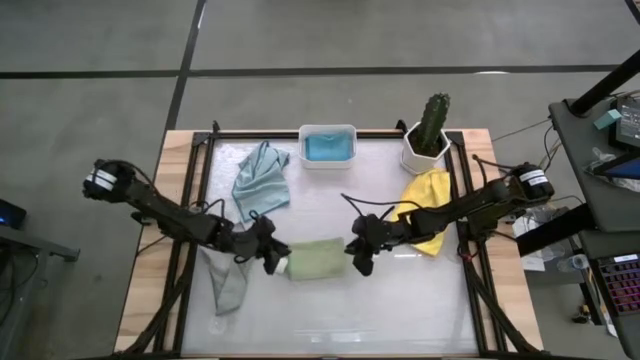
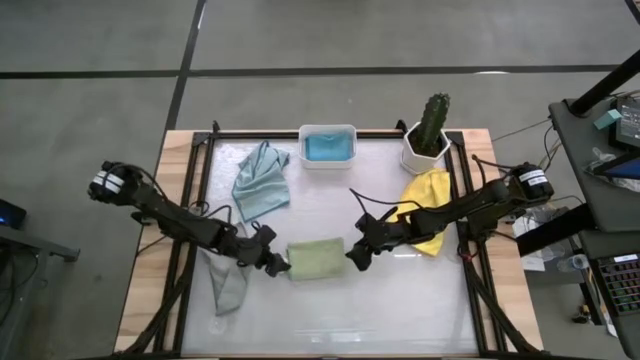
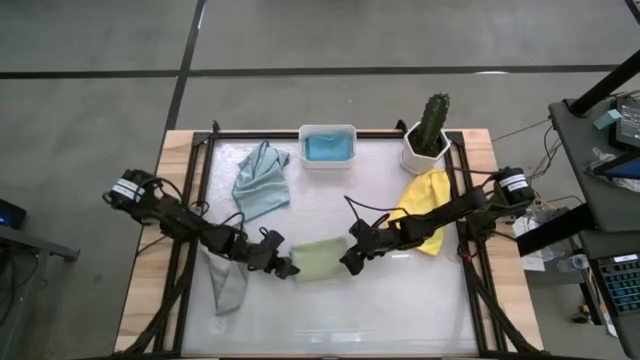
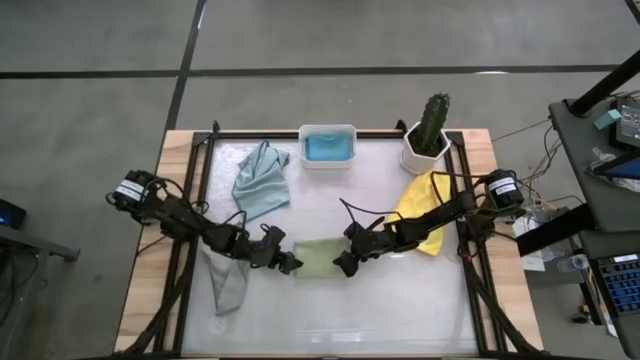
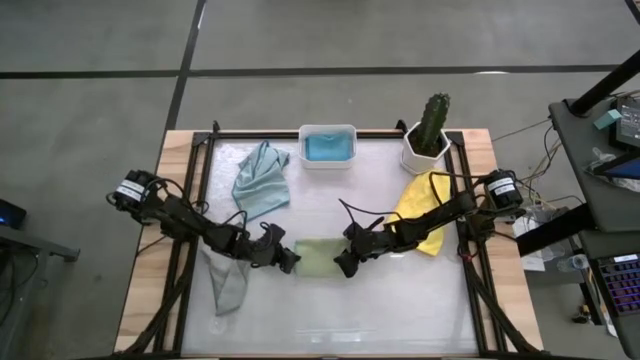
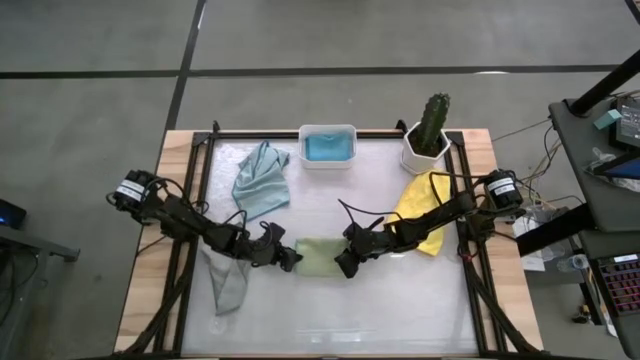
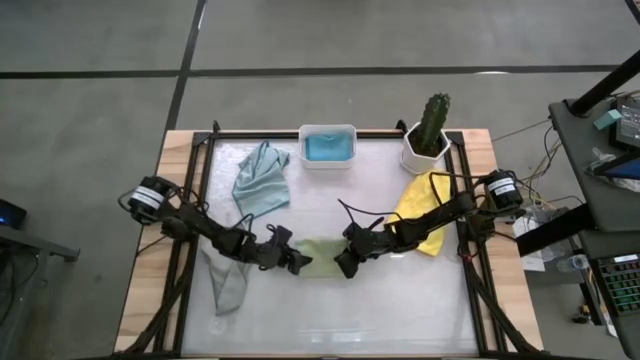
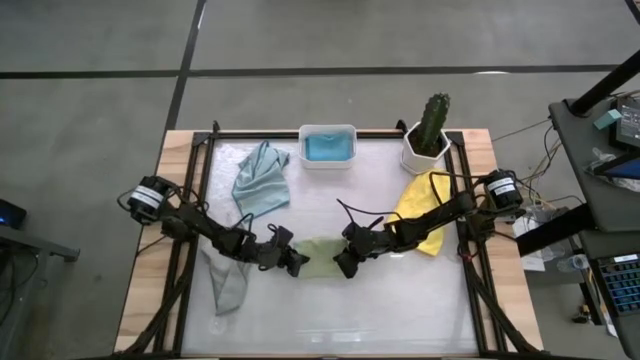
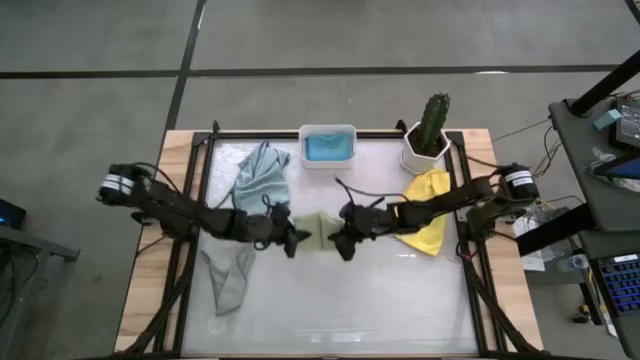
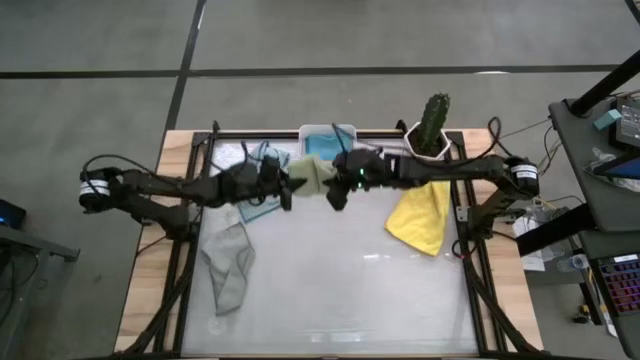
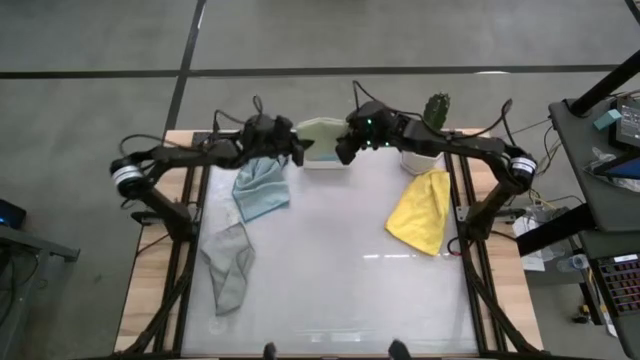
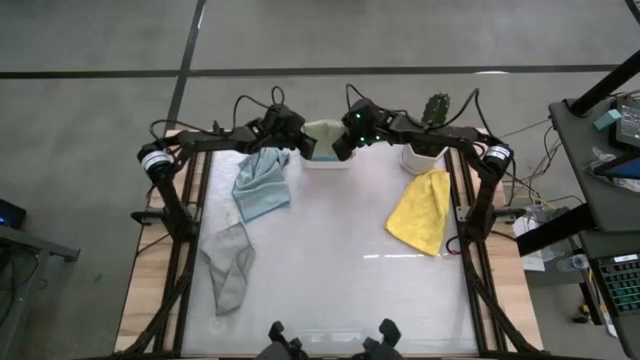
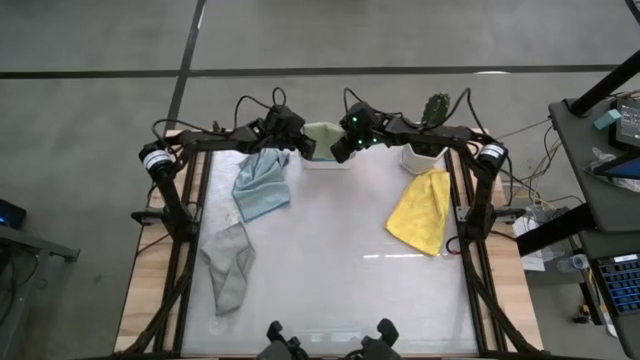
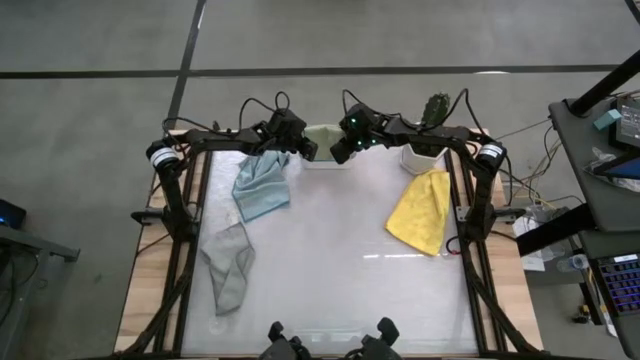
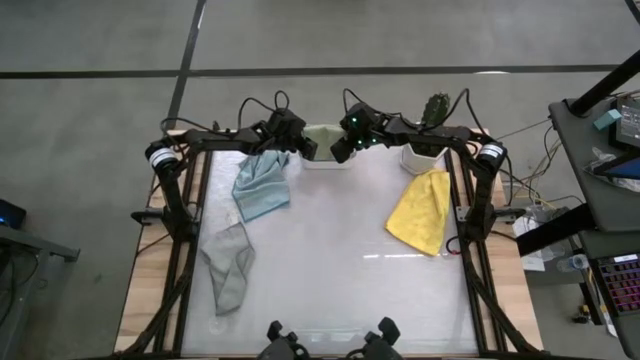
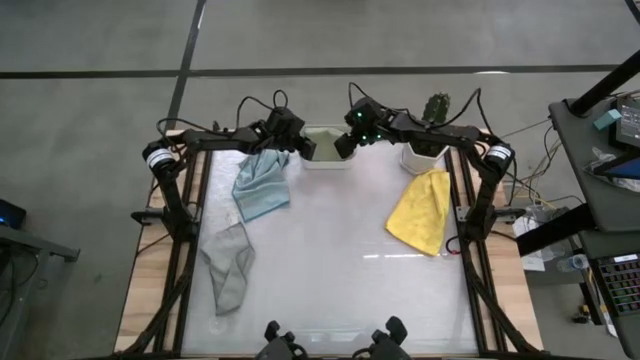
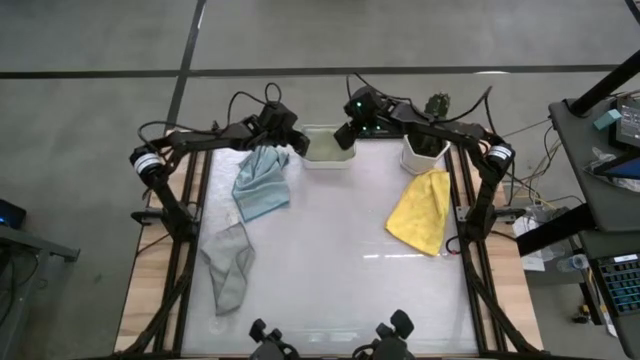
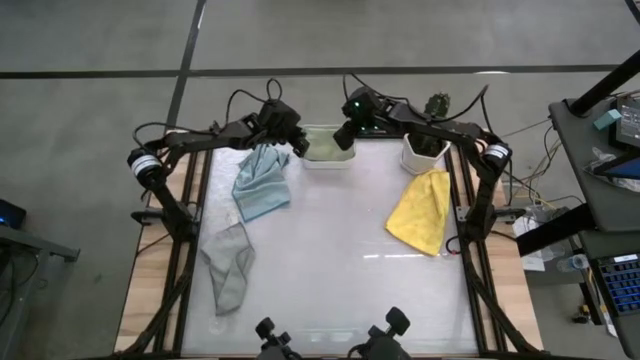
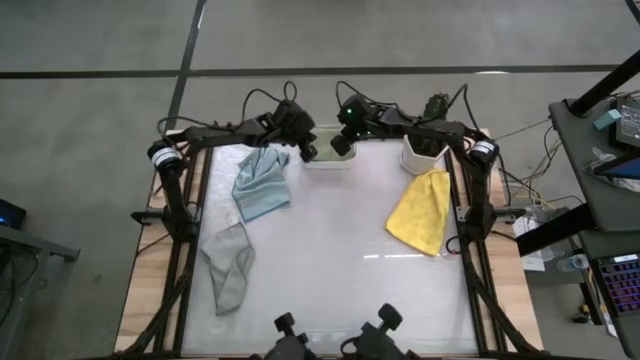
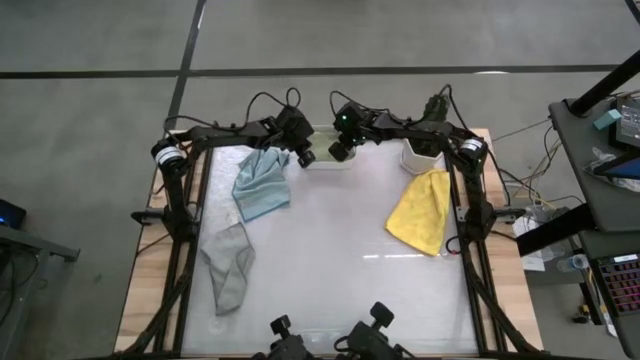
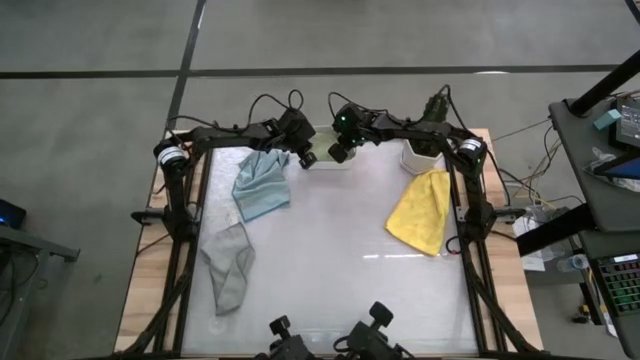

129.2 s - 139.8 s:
Task: Fold microfiber towels
Put the green cloth into the bin

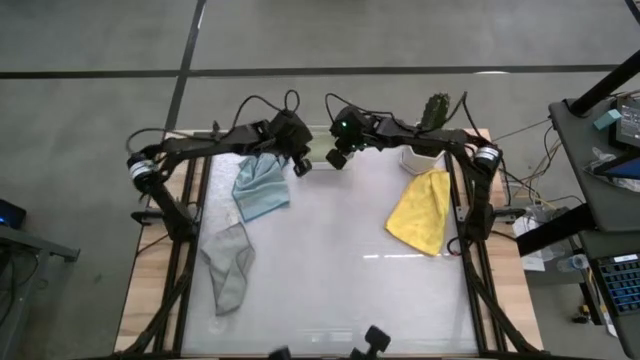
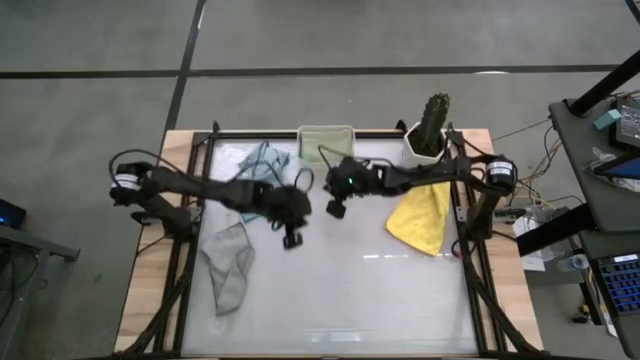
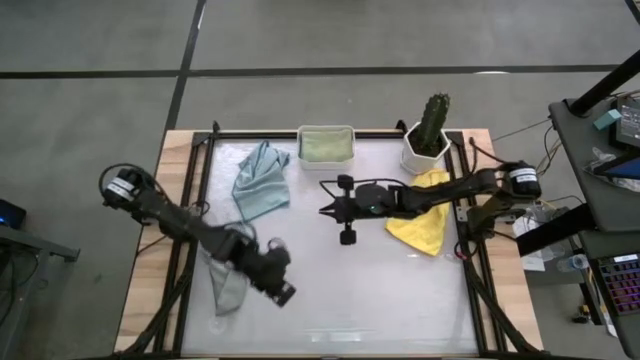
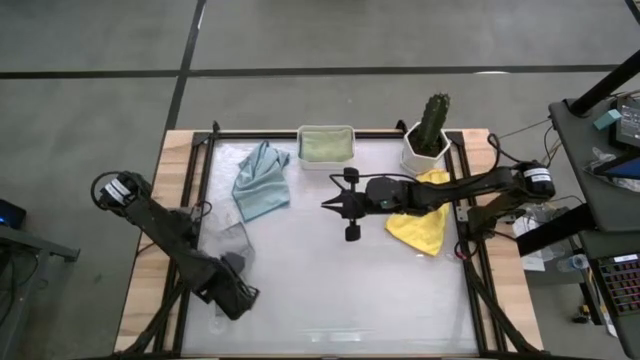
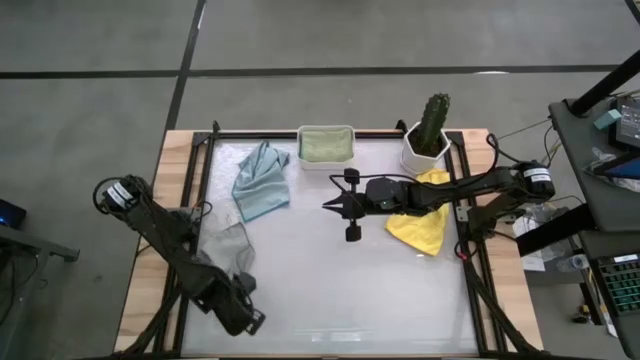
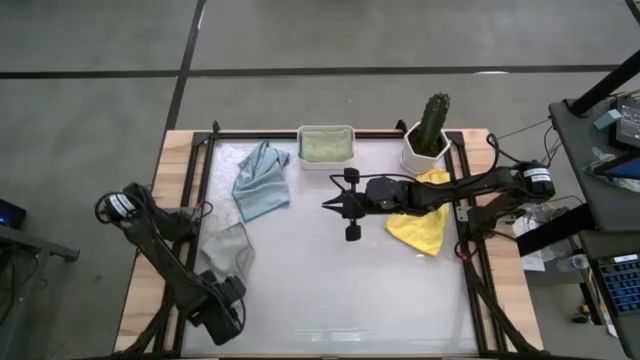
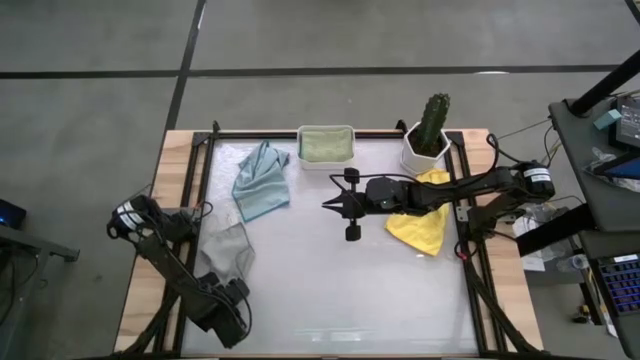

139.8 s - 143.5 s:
Fold the gray cloth
